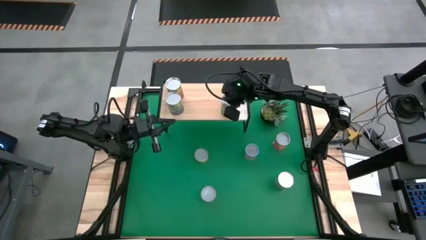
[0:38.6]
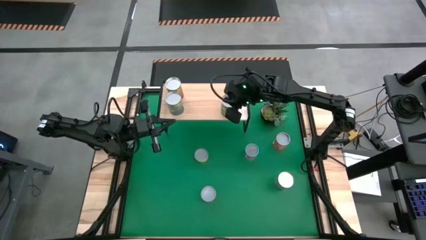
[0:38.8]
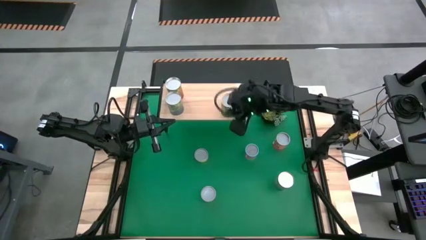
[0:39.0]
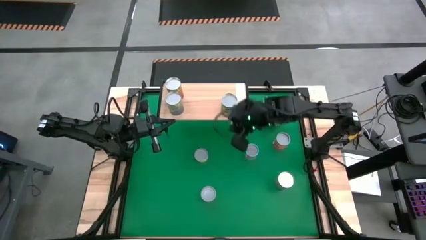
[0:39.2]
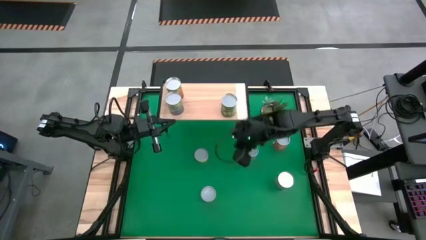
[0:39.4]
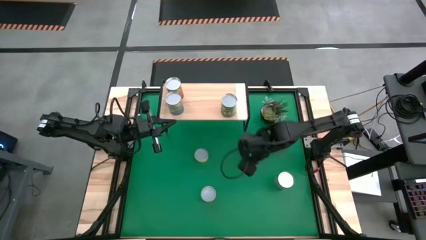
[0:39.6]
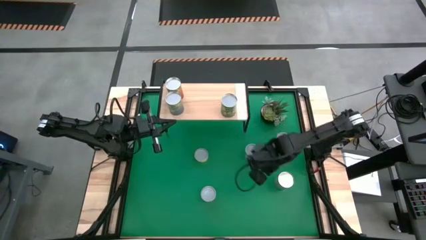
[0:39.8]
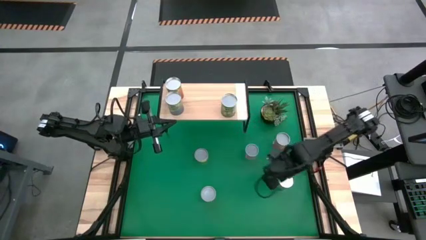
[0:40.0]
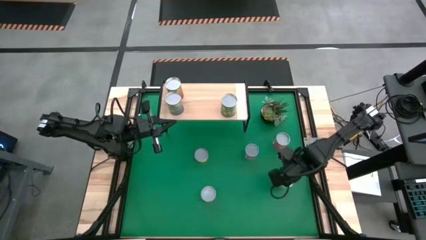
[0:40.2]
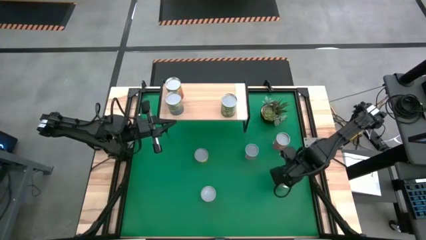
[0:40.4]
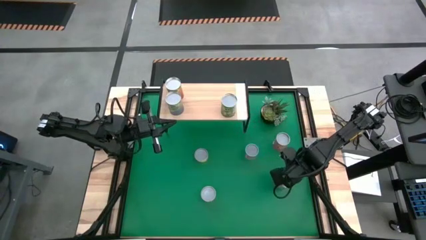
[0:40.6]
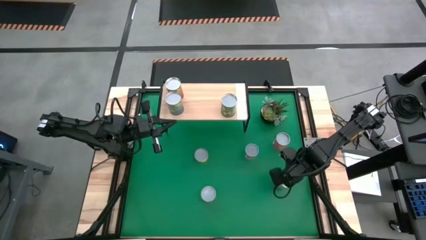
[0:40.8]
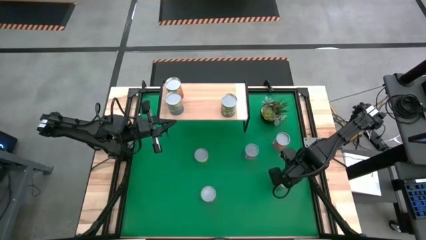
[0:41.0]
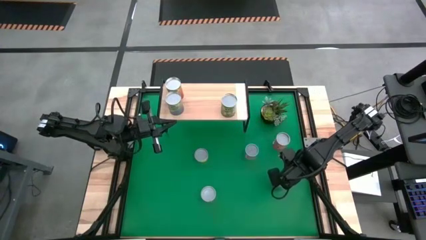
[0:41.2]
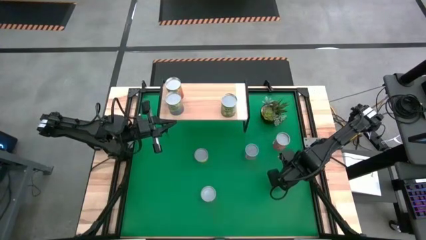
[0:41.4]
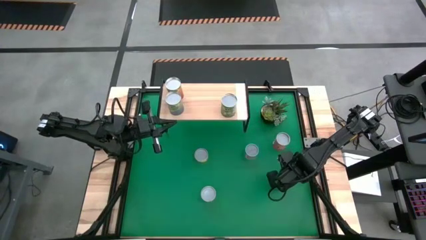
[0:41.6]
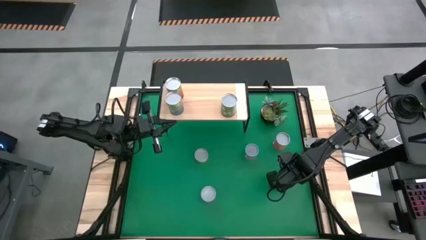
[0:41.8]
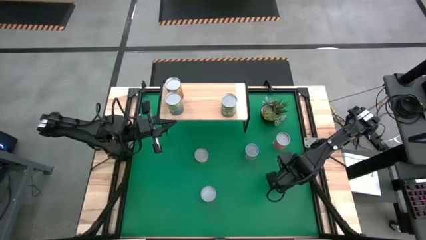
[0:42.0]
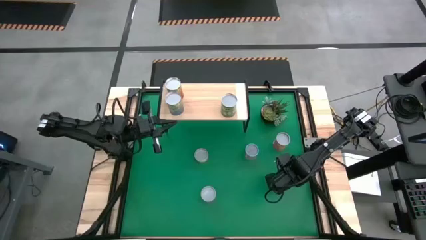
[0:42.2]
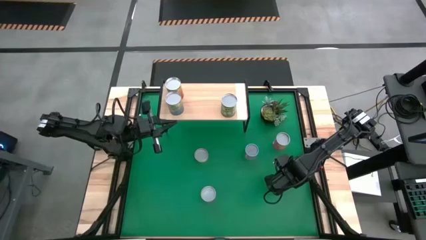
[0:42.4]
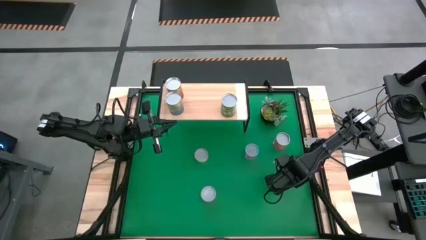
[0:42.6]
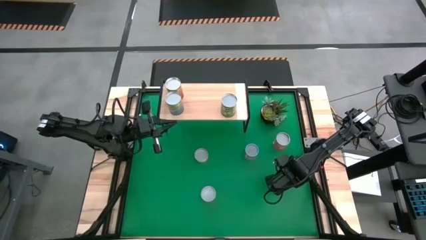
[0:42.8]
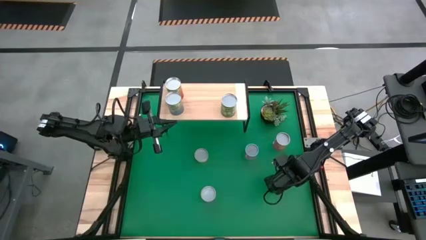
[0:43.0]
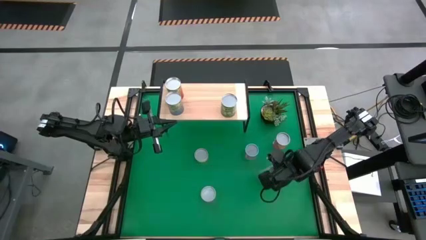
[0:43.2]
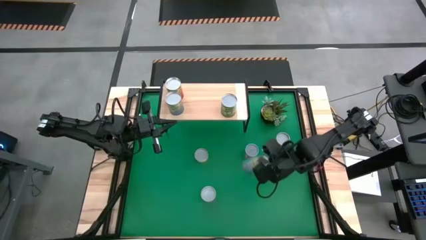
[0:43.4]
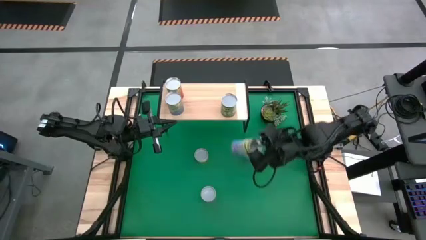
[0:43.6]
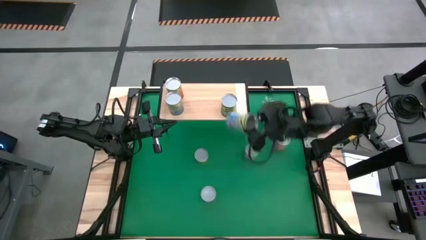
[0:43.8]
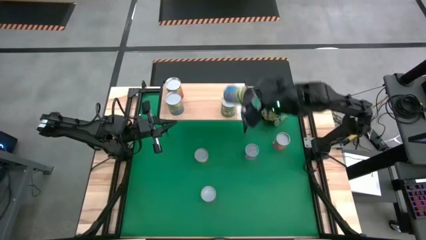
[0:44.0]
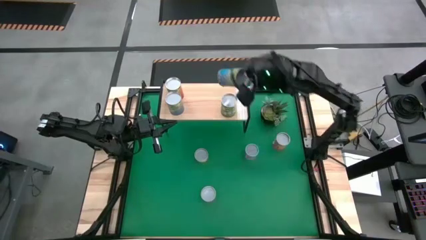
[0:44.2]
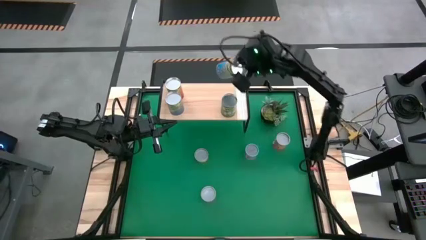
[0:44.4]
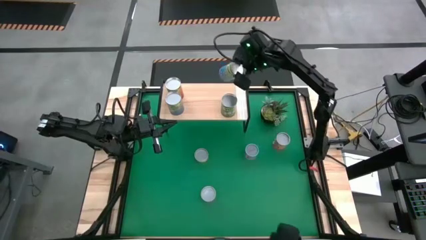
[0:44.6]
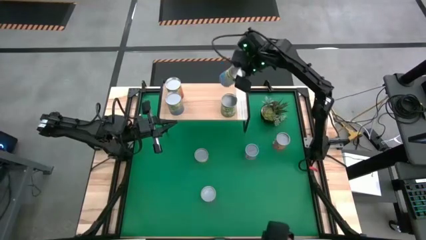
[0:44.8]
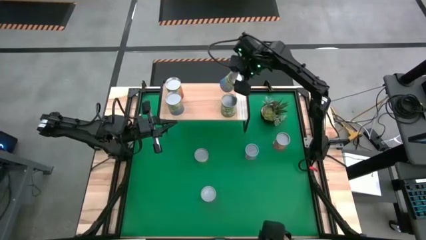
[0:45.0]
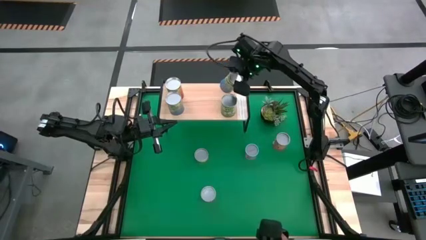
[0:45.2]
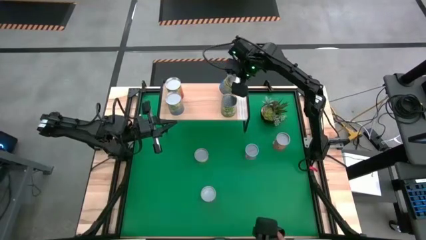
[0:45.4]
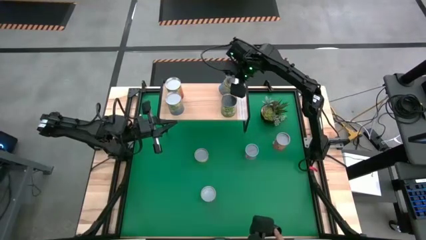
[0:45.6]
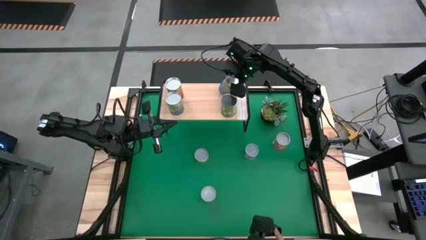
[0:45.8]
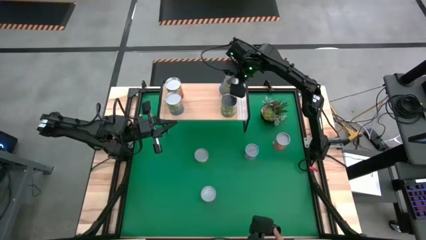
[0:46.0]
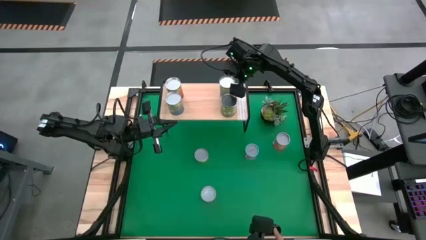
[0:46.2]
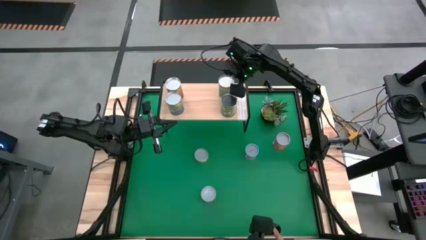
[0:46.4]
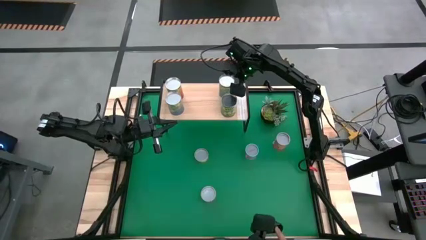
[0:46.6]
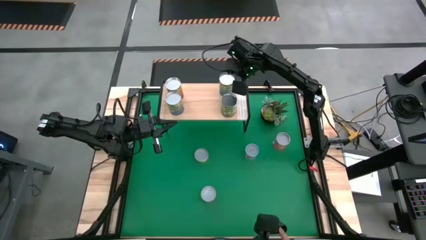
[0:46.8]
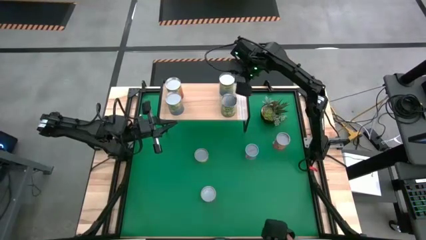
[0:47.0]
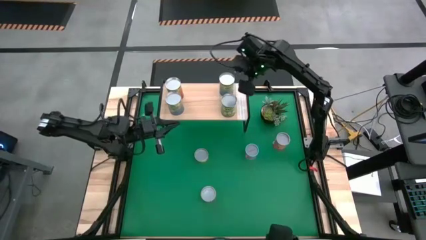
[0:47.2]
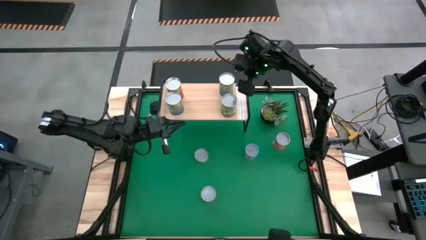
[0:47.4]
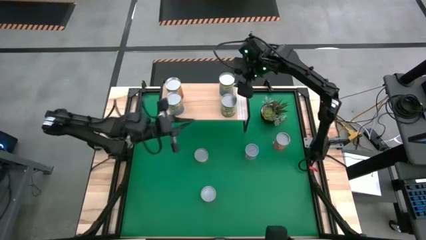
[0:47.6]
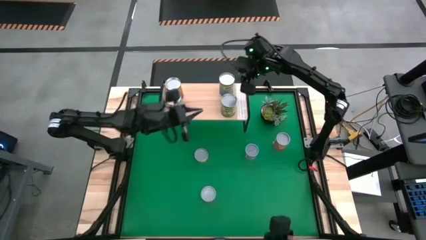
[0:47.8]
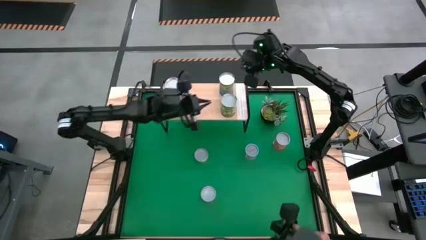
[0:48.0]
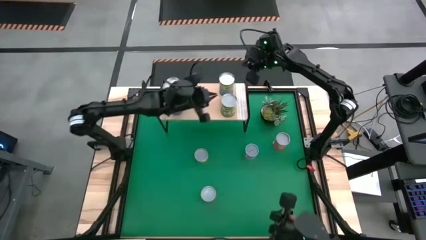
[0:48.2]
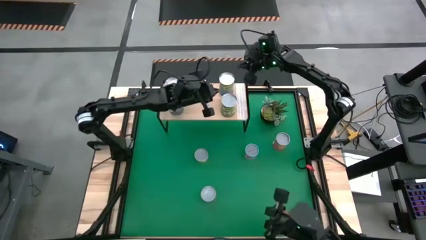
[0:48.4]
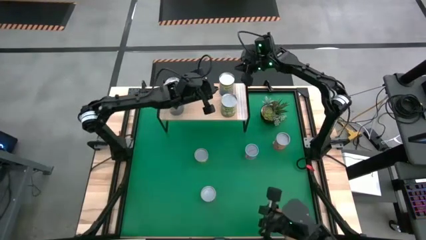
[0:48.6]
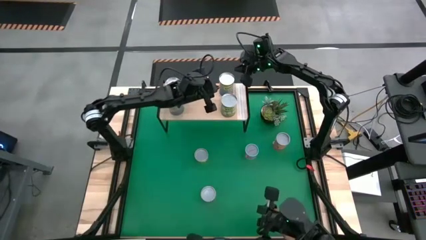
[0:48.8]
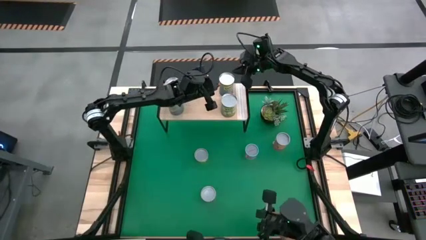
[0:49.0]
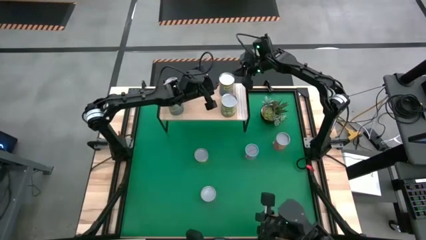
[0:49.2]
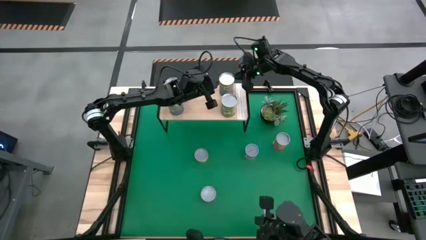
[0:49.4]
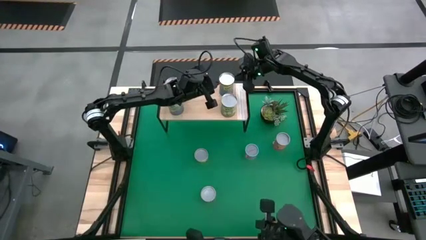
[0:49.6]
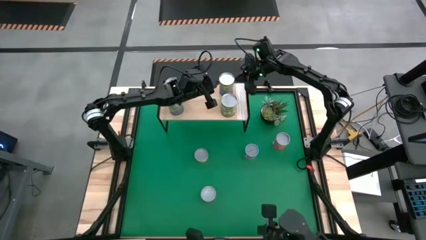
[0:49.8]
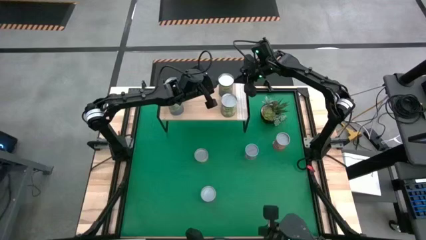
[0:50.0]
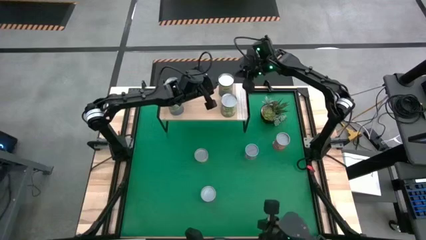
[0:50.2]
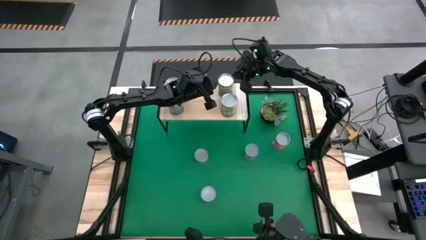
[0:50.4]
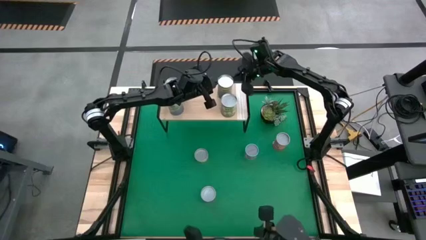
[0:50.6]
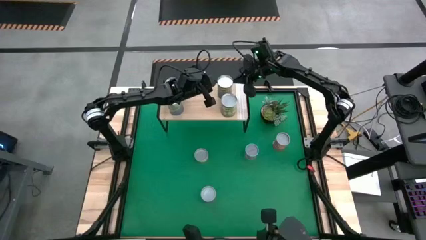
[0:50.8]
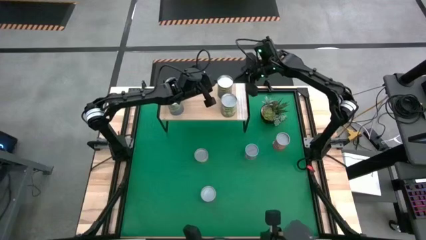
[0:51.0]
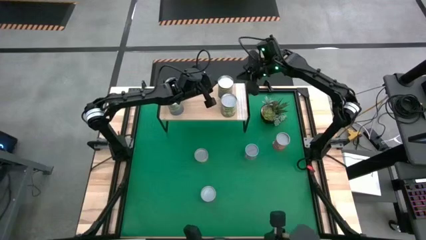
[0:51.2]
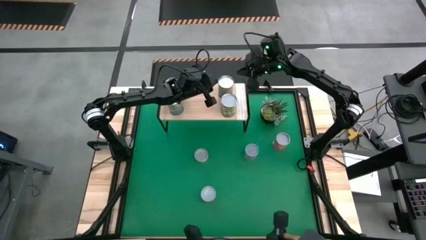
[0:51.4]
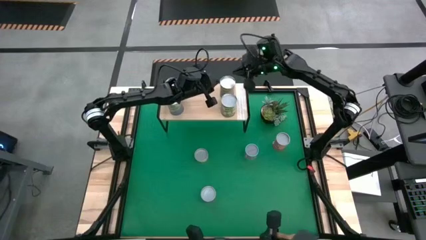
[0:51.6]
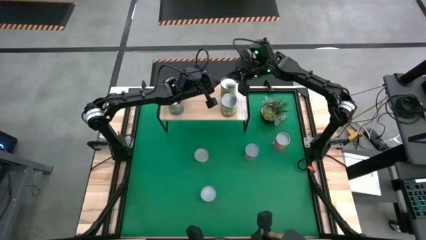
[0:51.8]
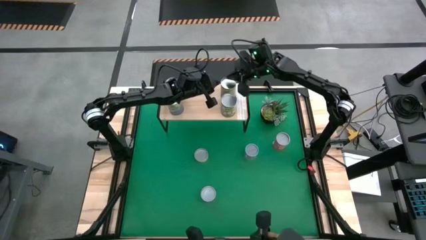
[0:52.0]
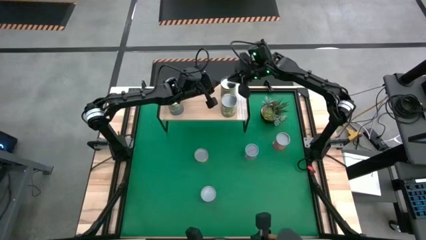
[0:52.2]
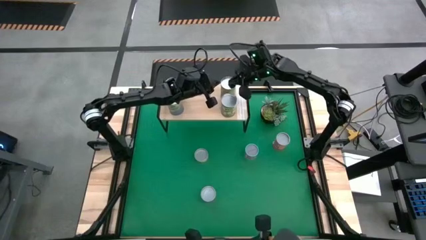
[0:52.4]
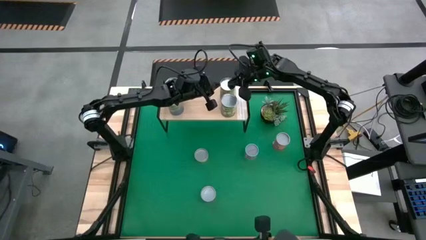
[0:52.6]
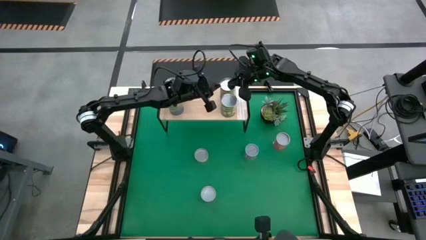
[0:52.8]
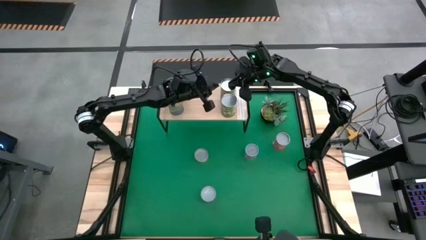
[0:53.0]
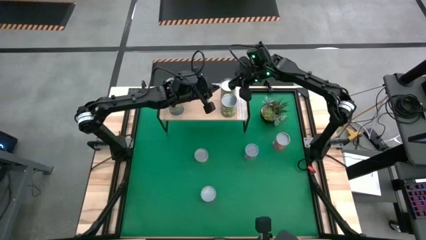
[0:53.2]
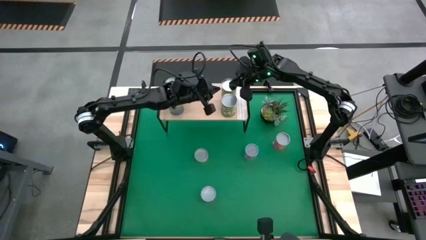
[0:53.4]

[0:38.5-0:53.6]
Task: Pick and place cans onto a shelf
Put the big light blue can on the shelf aligned with the other big green can
